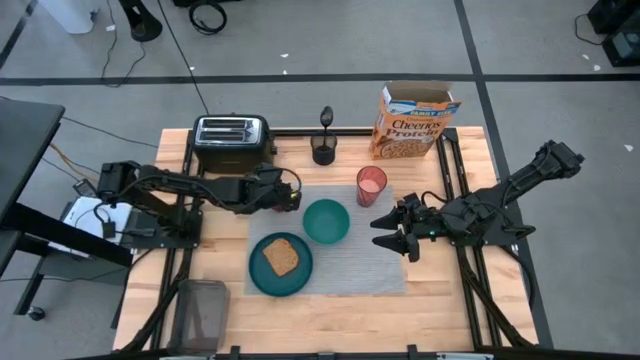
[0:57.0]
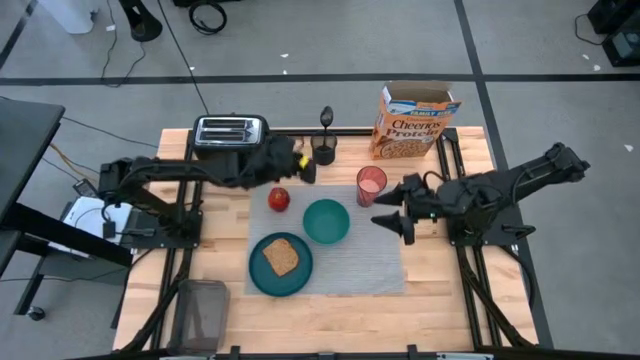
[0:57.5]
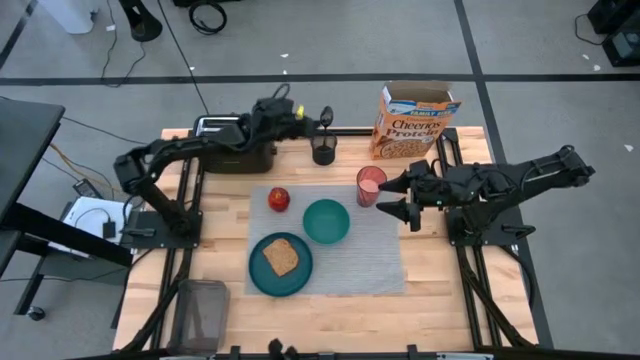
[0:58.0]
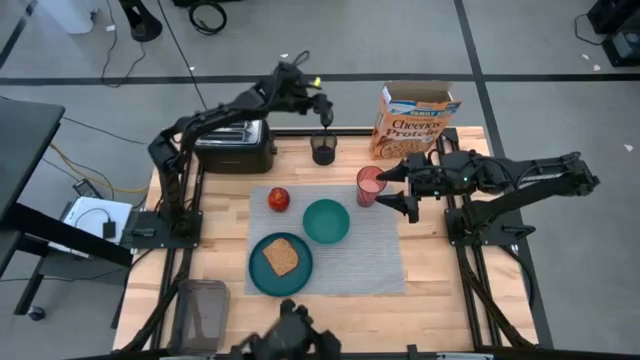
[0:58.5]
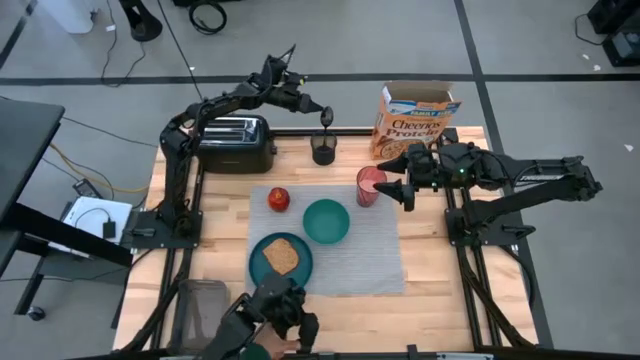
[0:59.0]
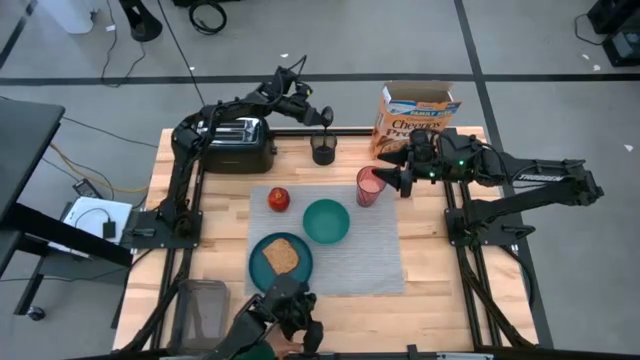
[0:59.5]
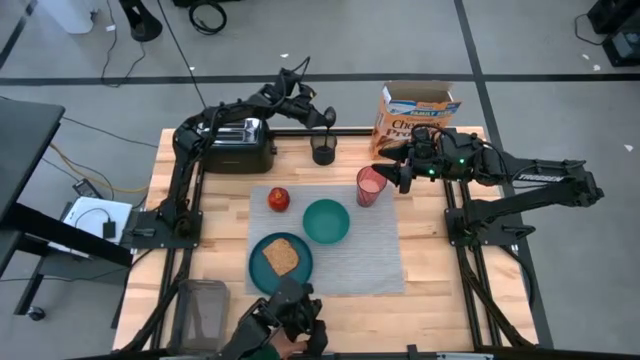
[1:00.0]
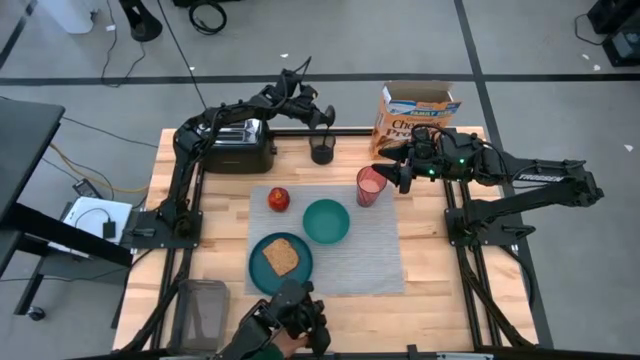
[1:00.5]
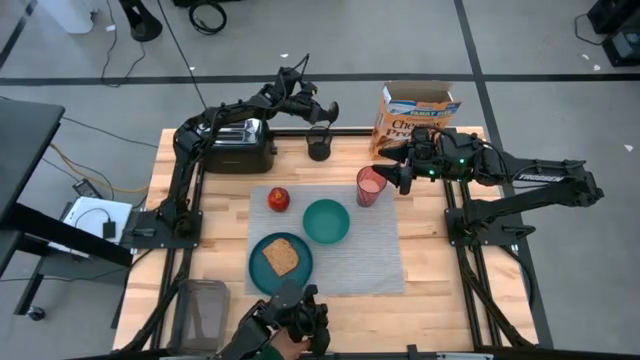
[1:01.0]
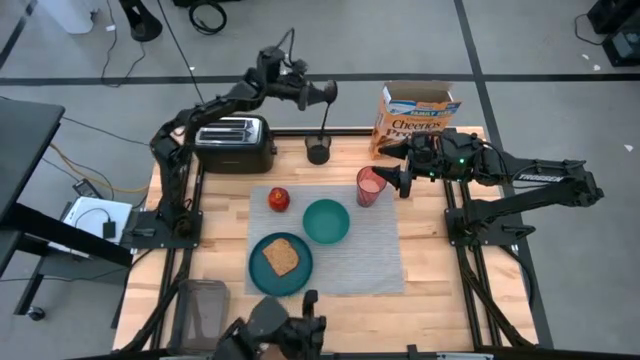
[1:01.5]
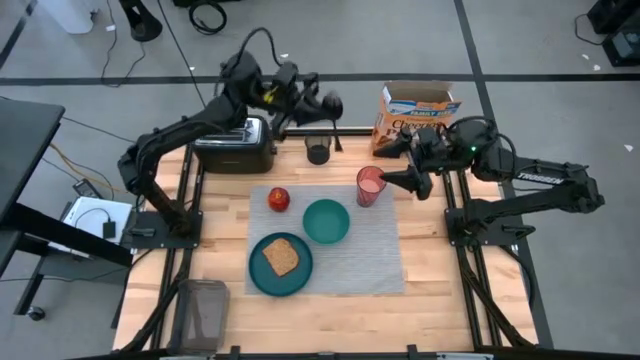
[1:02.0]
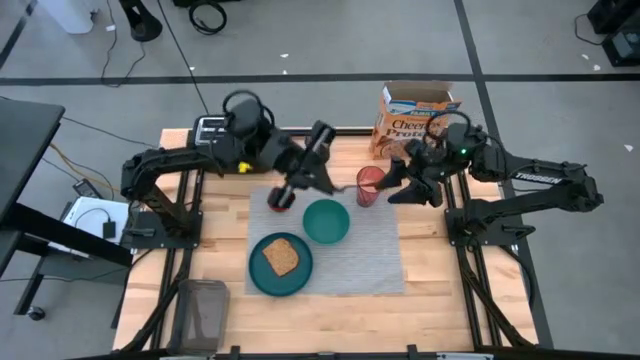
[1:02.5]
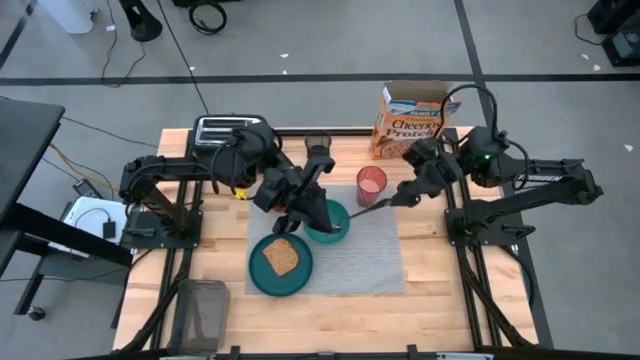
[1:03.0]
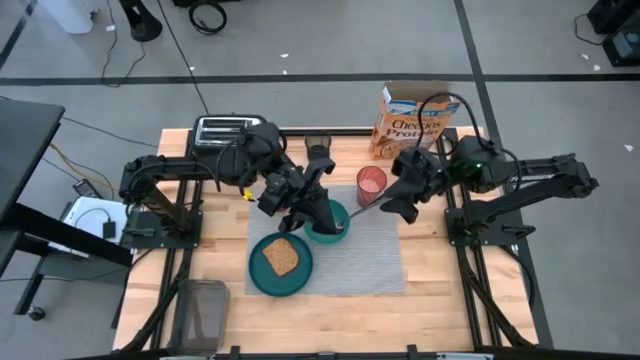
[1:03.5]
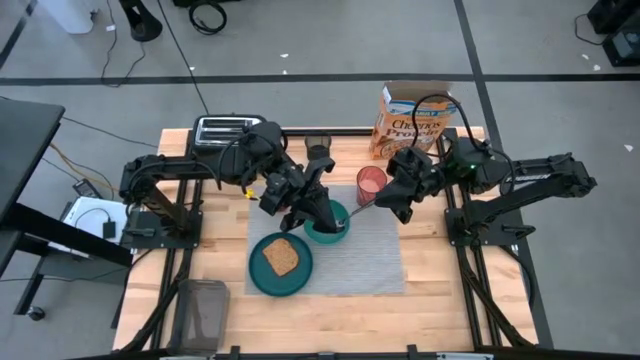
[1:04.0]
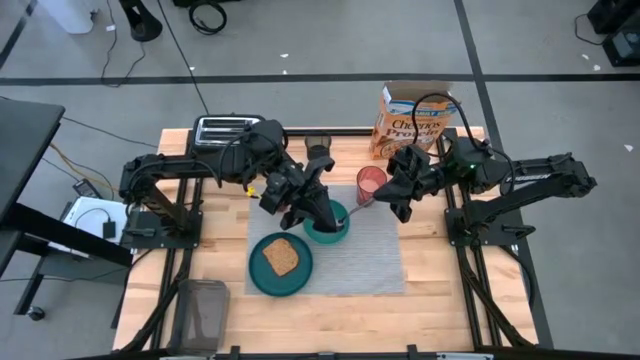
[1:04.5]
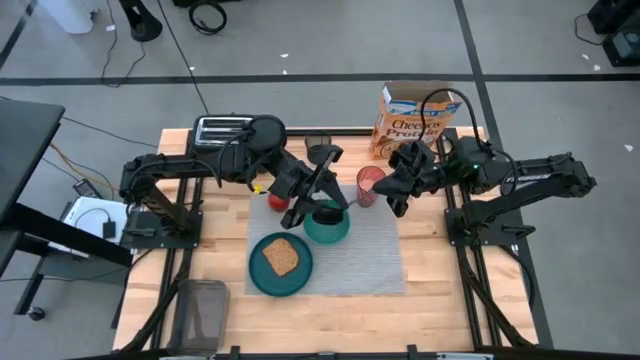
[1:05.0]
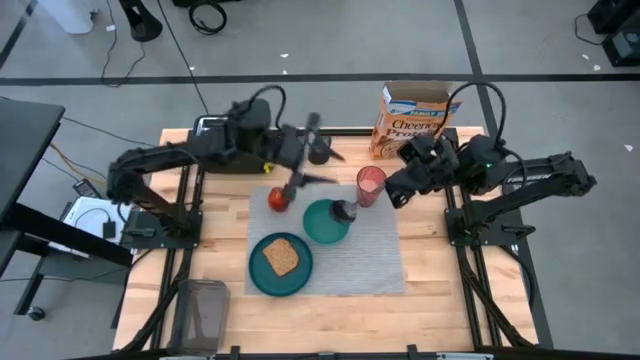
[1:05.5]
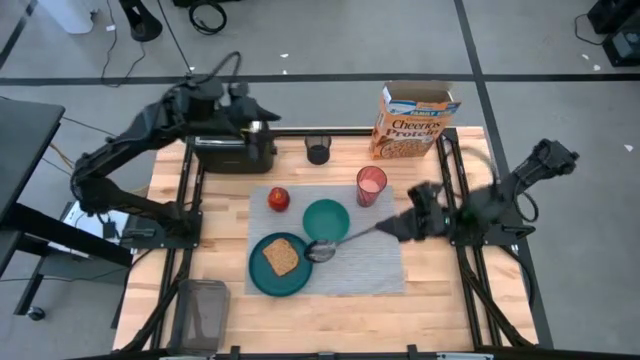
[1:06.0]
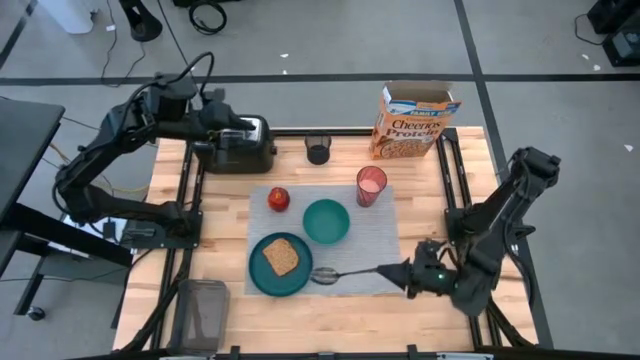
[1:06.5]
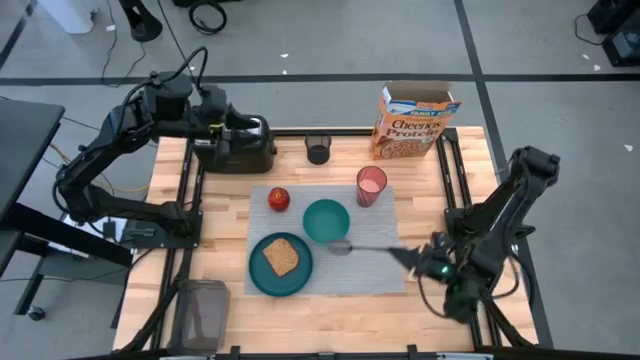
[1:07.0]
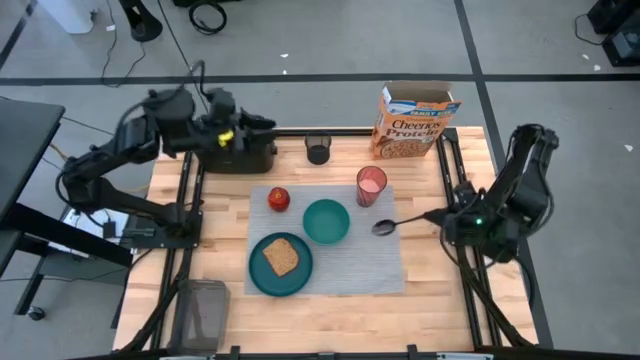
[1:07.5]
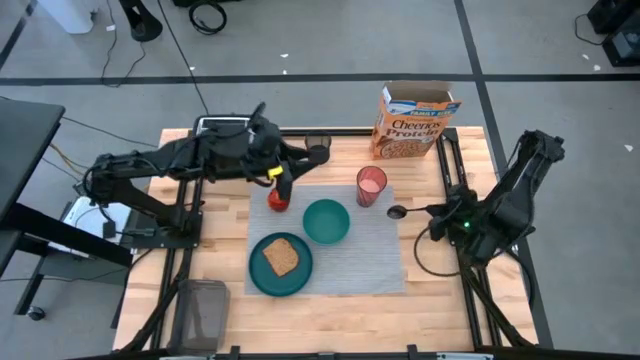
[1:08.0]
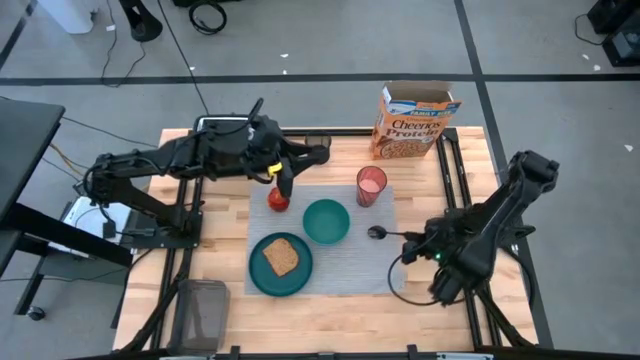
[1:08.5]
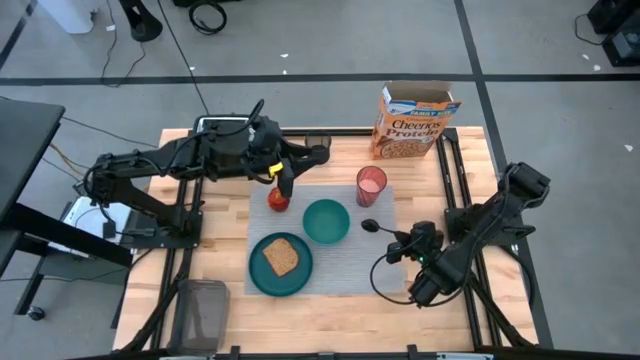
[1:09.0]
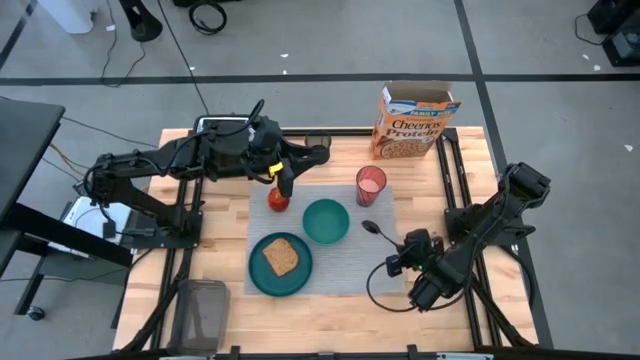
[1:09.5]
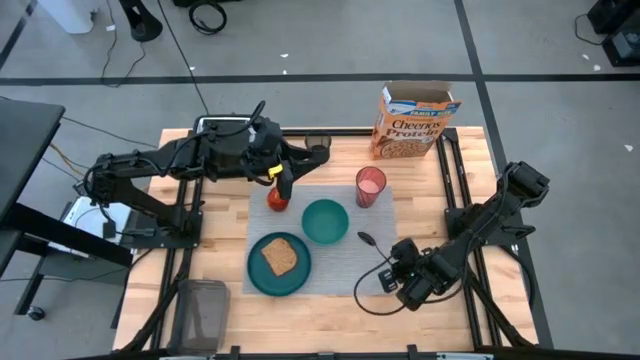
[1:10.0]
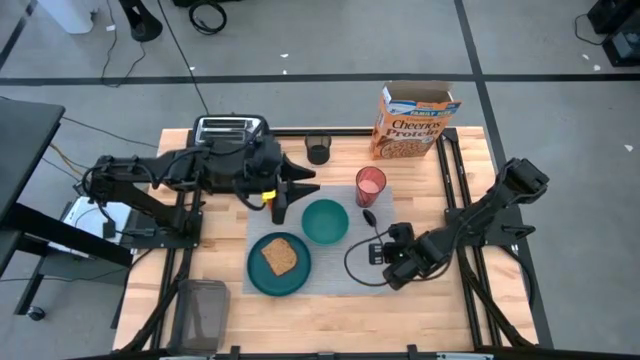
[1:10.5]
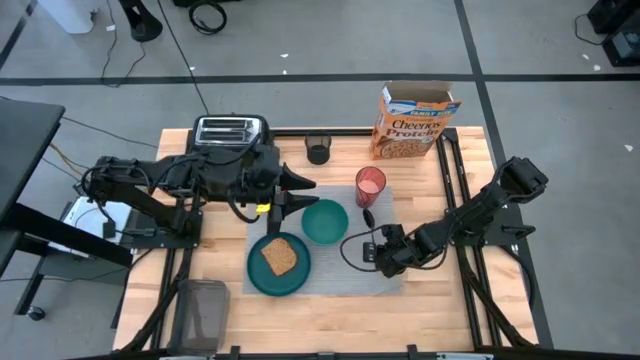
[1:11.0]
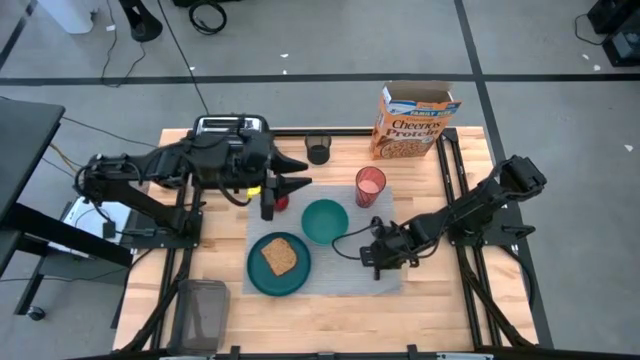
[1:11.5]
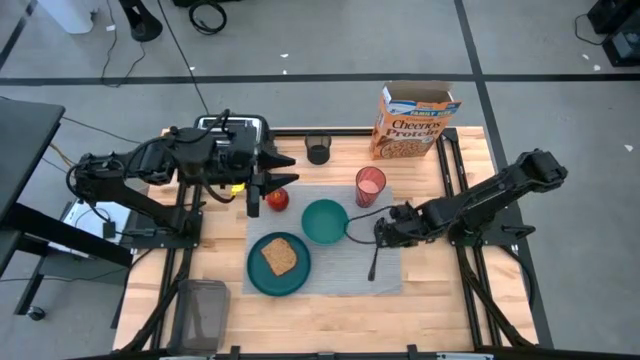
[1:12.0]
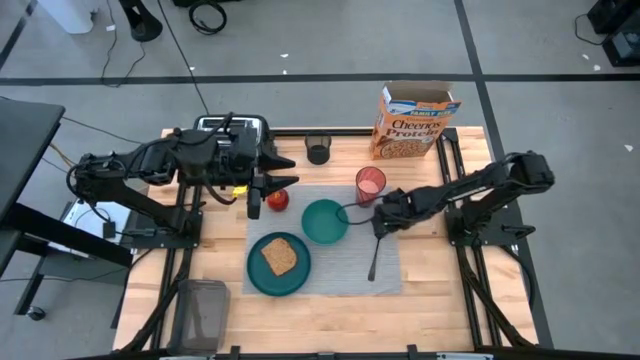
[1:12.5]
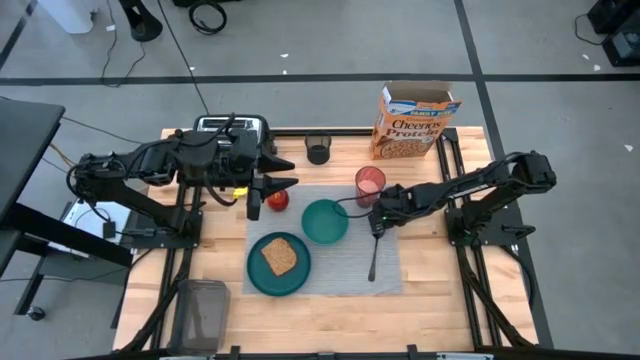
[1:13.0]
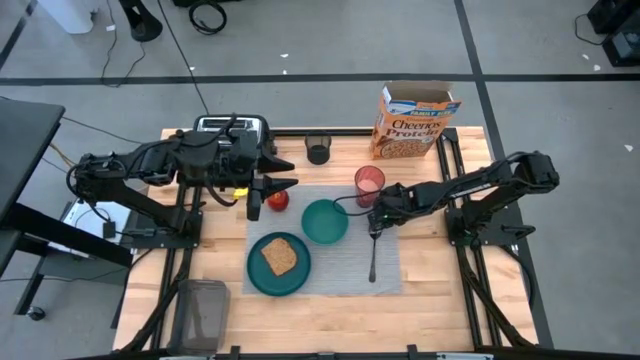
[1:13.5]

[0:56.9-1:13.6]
Task: Arrange a breakfast setting
Put the black spoon on the gray placemat to the bottom right of the dark green bowl
